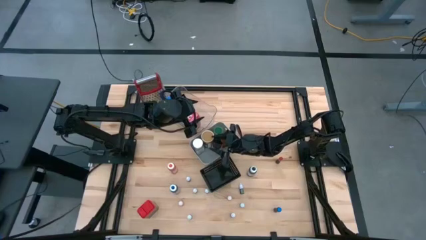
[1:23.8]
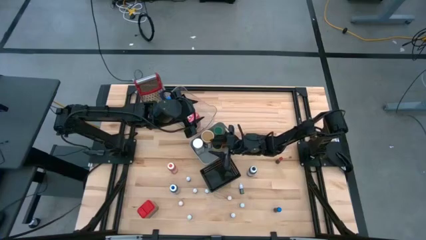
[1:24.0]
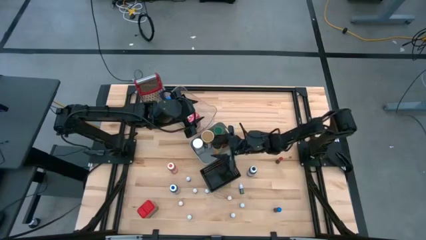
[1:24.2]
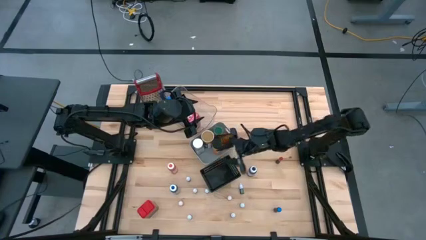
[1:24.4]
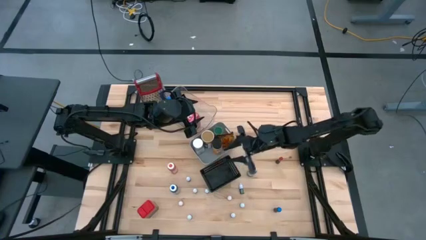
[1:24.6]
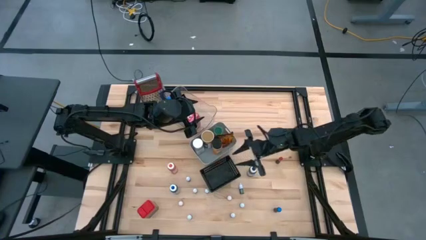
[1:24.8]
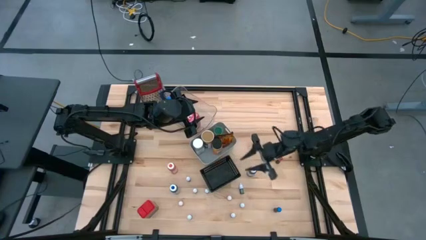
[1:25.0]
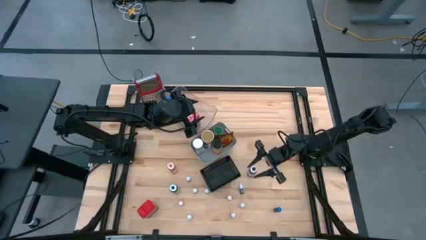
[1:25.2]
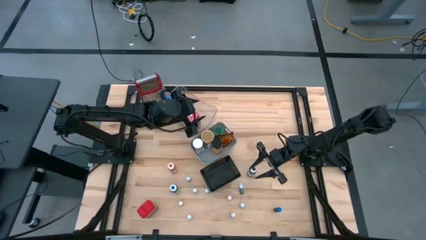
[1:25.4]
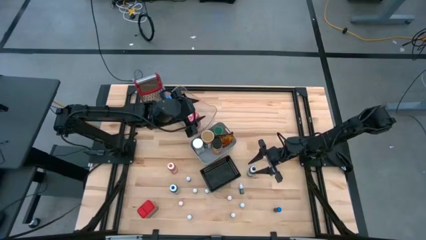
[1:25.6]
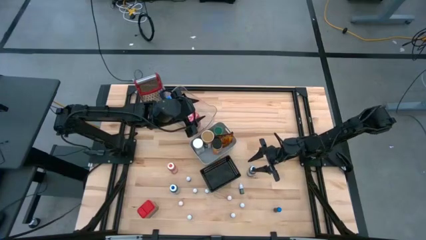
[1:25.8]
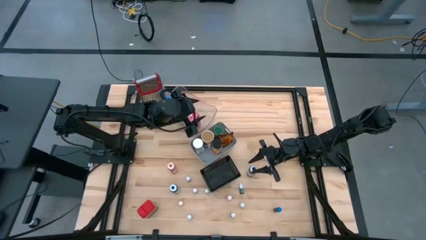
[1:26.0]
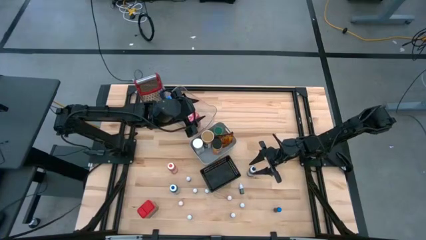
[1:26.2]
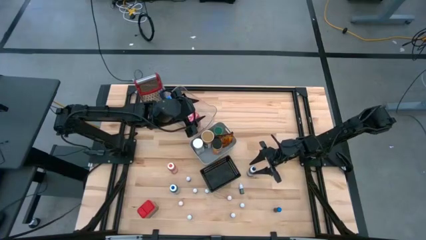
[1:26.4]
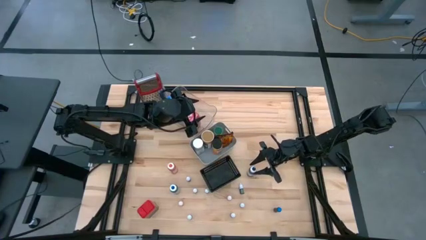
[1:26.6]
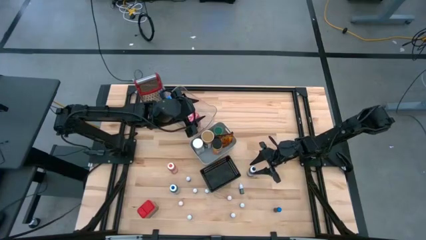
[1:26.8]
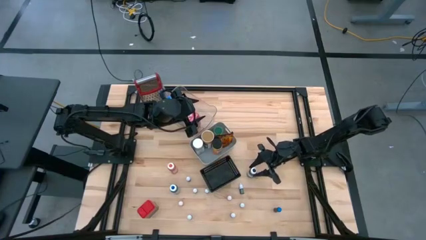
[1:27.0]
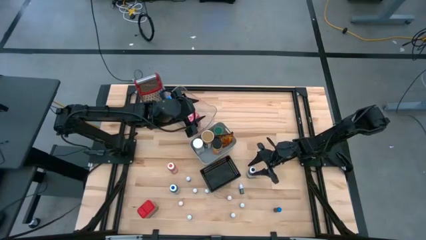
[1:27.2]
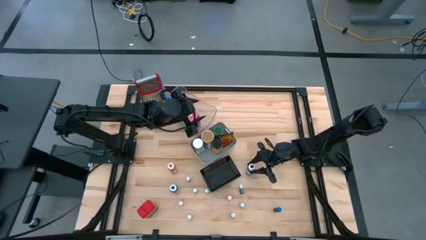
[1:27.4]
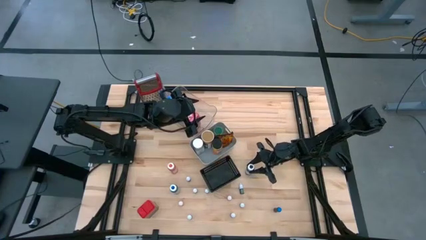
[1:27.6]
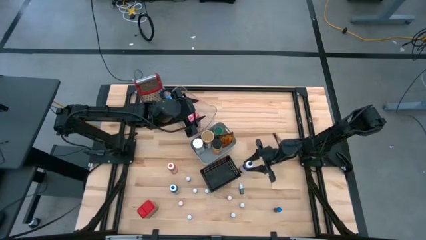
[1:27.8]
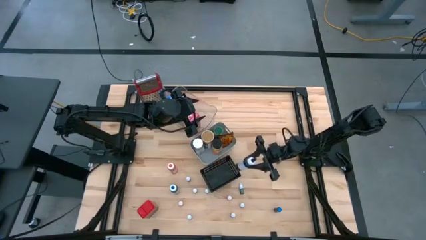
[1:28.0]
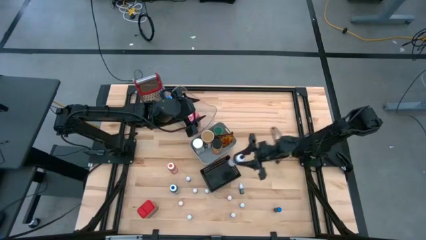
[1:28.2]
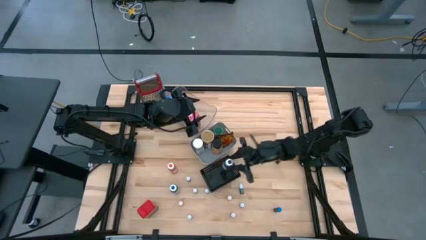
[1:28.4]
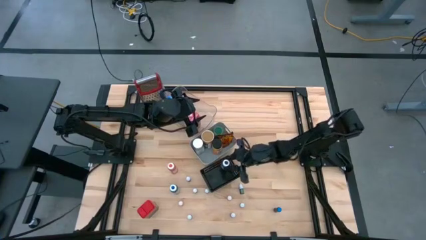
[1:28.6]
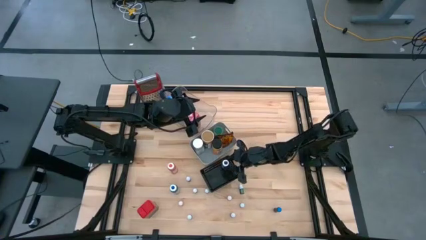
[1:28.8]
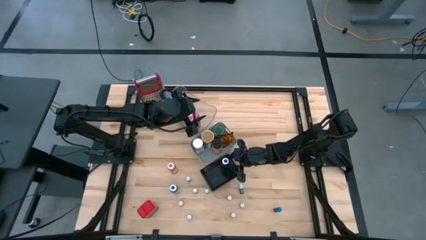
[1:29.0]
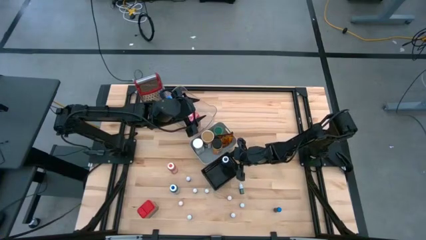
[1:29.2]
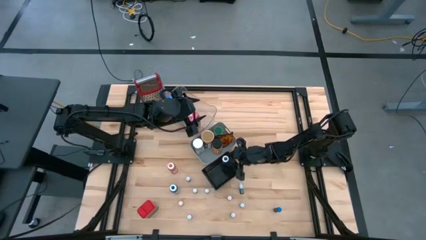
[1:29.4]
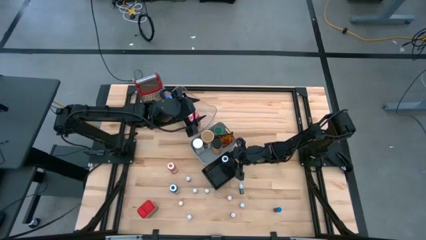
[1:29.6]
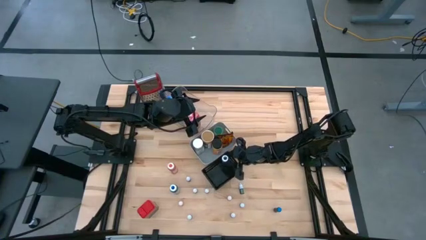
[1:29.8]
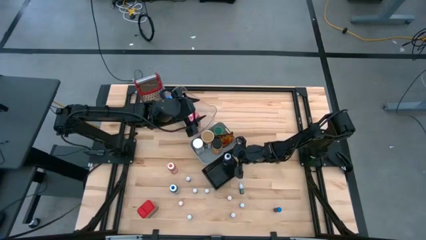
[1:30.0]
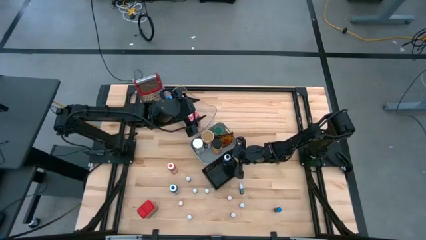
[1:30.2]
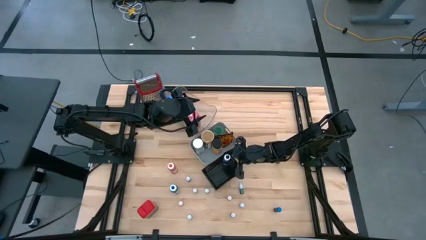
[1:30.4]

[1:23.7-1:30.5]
Task: Pick & Place Kitchen Items
Put the black food coloring bottle into the black bin

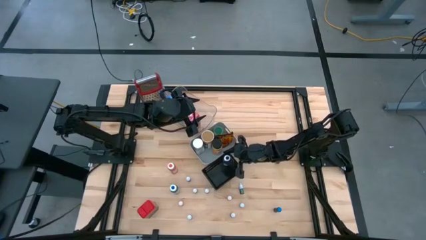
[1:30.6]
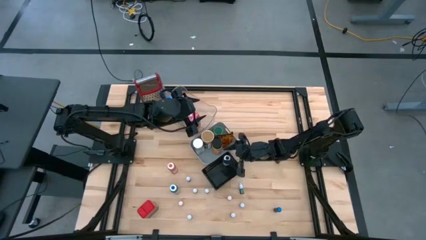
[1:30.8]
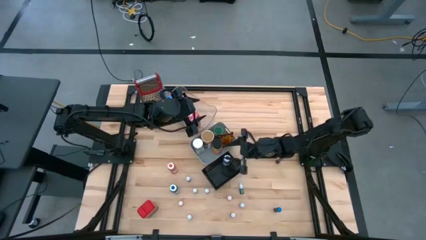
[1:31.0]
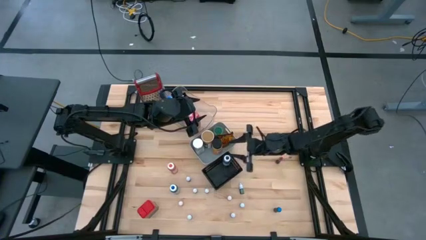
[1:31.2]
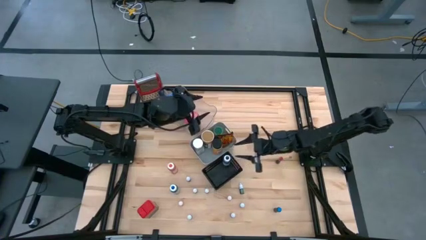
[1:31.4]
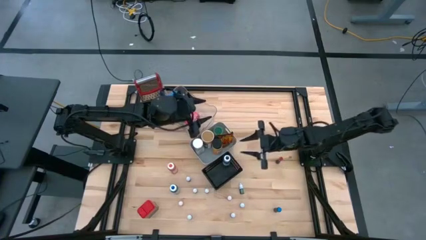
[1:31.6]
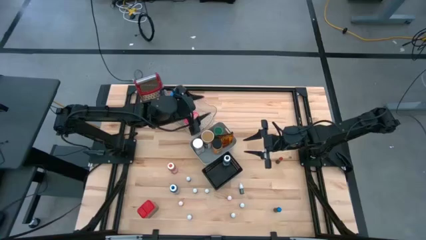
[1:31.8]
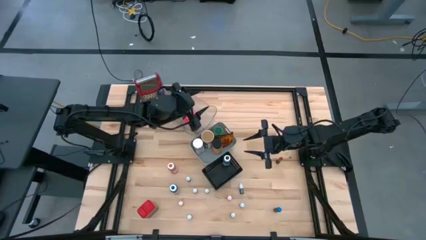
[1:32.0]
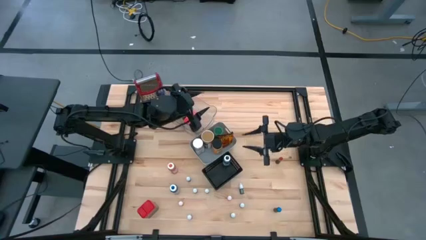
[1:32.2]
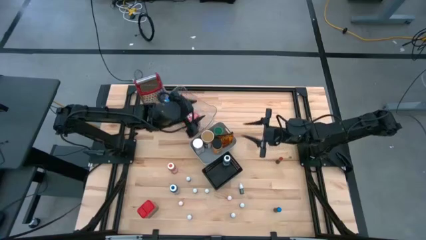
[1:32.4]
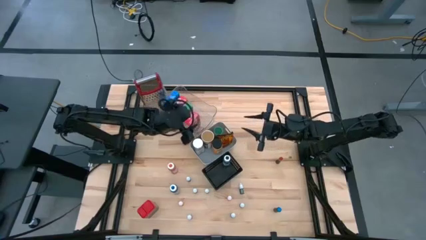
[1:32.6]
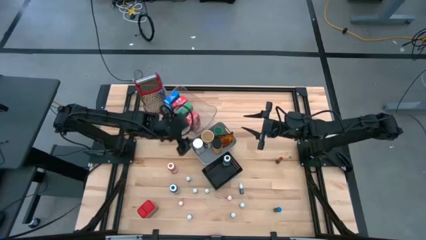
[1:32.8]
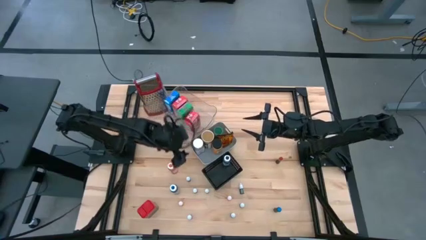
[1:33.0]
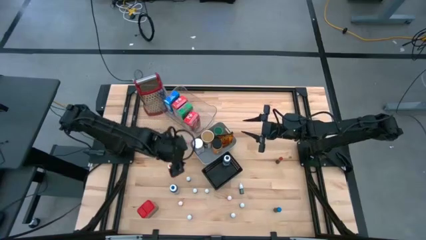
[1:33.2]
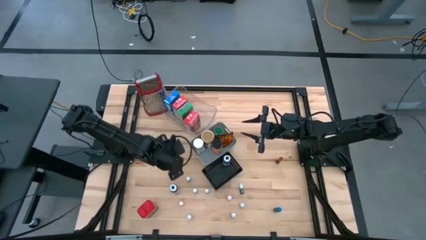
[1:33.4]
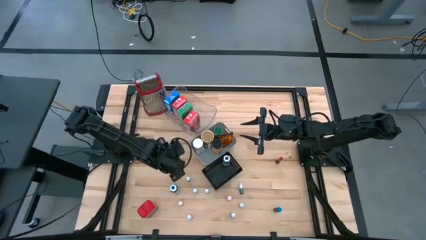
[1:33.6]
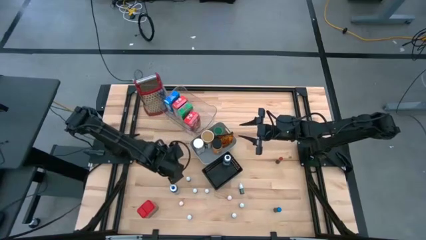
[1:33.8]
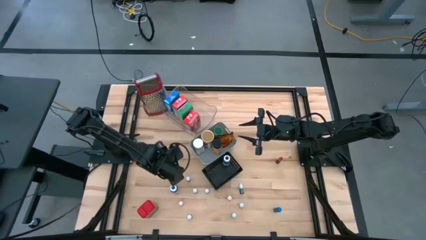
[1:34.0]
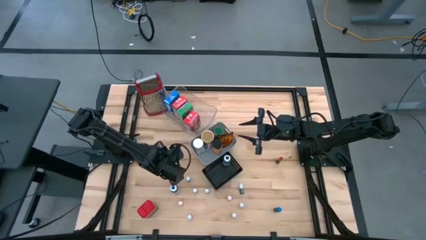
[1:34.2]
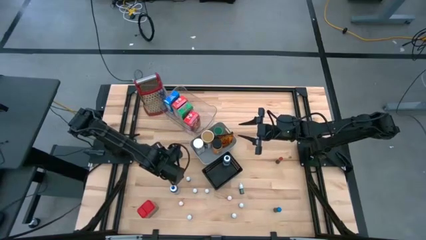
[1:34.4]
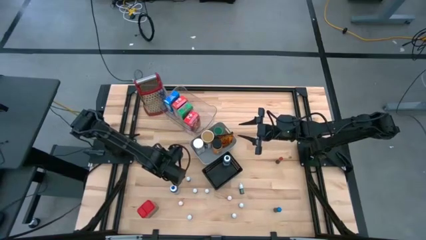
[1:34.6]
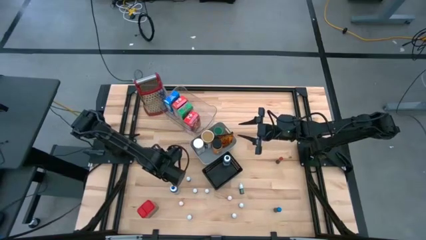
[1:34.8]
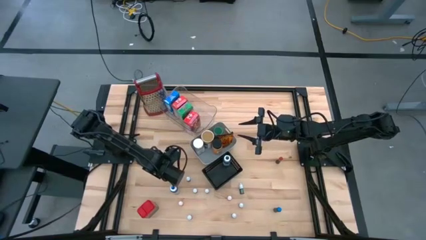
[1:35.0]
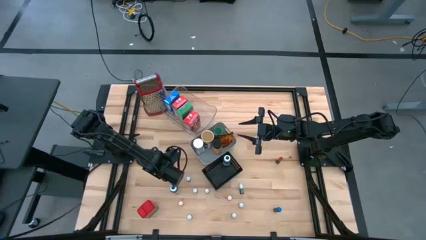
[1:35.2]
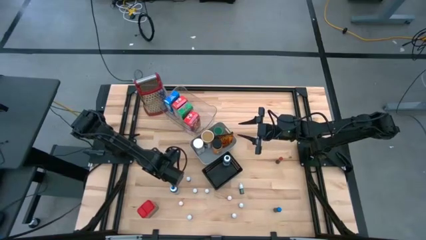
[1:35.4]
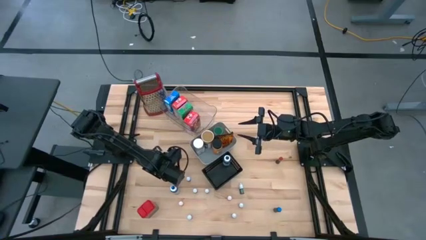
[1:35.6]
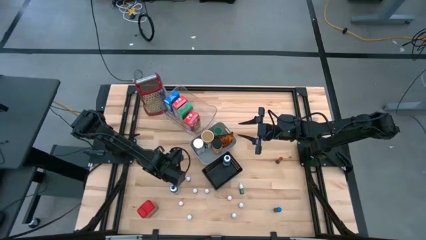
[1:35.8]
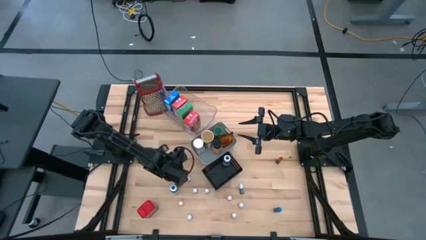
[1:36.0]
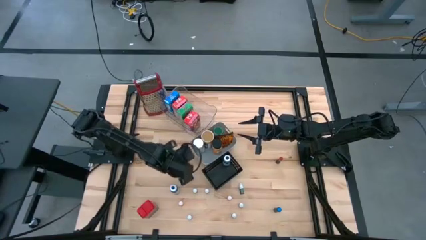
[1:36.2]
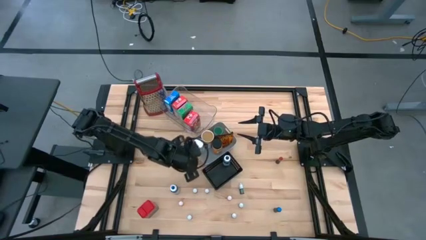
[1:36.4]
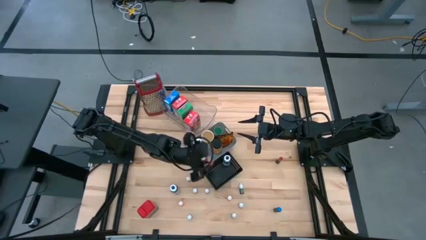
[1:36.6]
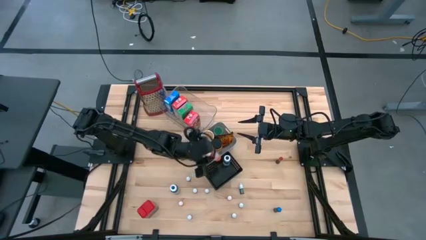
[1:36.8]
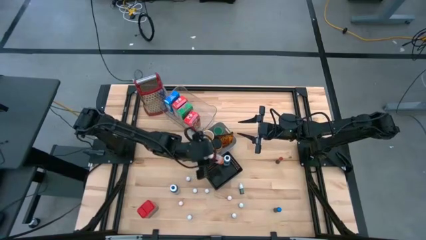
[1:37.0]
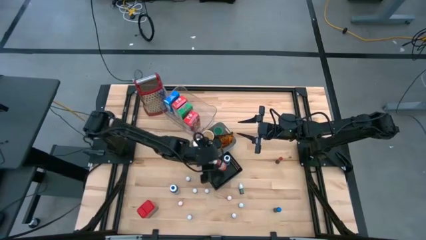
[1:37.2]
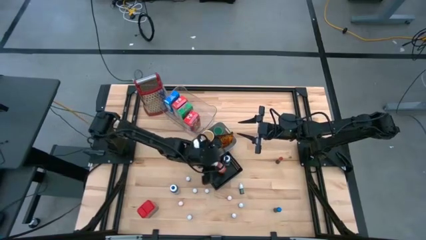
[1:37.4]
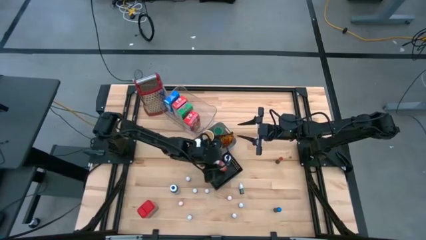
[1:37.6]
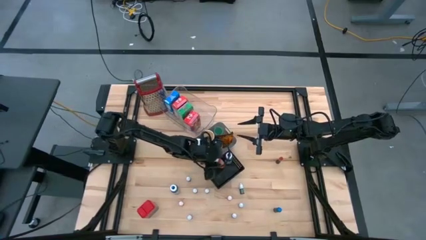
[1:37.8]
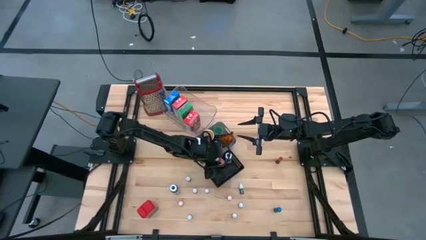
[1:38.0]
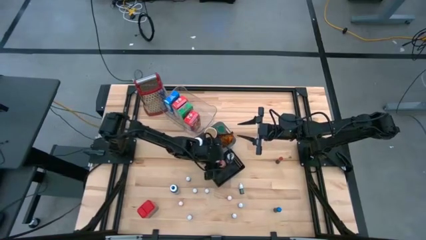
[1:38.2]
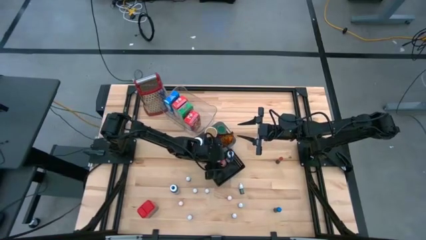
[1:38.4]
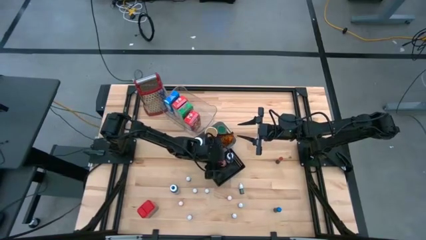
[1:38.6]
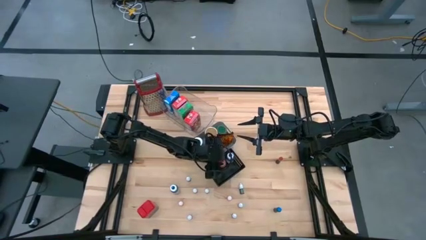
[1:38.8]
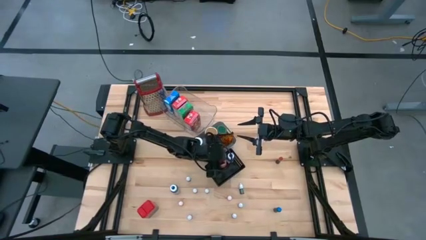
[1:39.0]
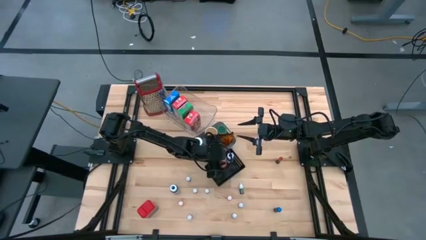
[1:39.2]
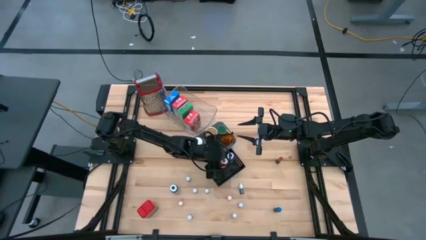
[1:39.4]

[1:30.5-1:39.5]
Put the orange food coloring bottle into the black bin

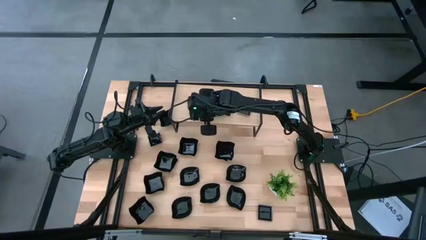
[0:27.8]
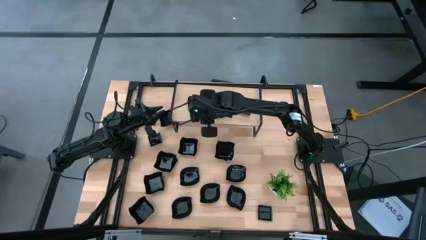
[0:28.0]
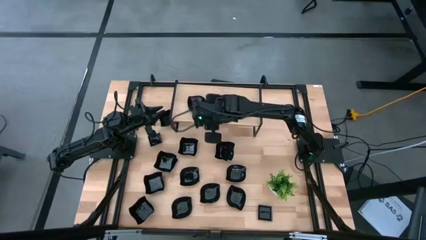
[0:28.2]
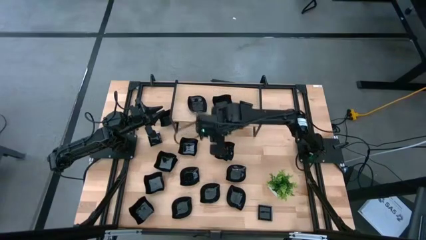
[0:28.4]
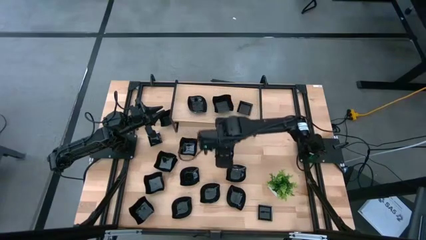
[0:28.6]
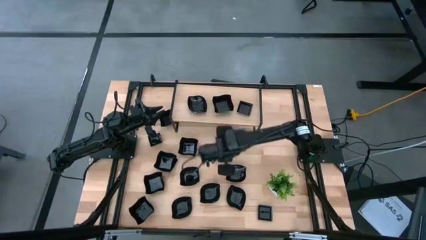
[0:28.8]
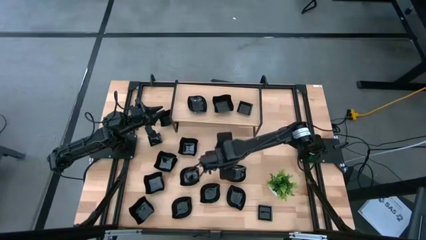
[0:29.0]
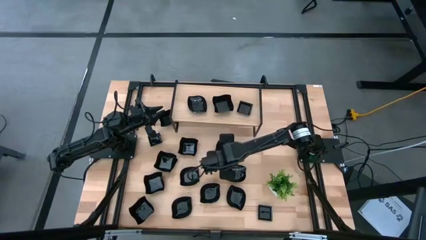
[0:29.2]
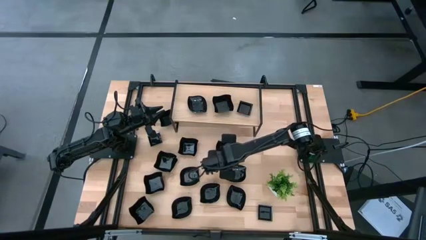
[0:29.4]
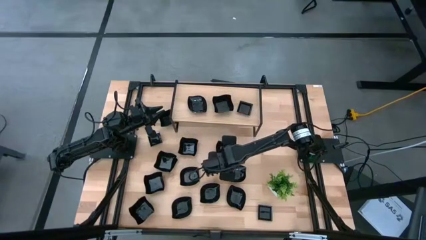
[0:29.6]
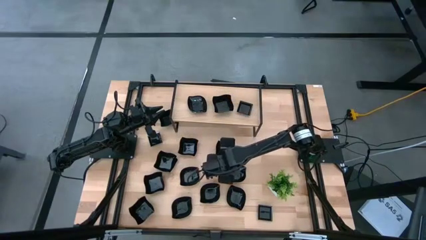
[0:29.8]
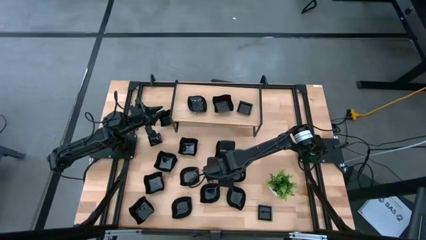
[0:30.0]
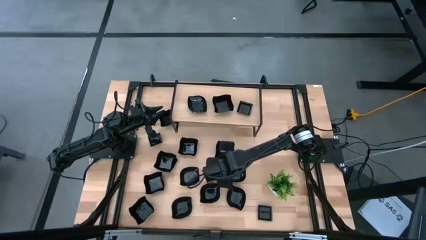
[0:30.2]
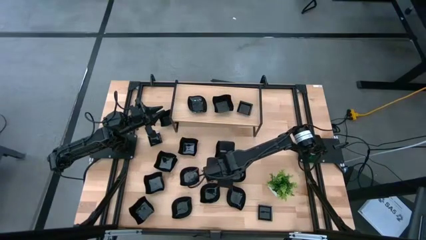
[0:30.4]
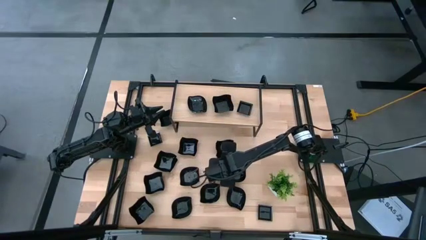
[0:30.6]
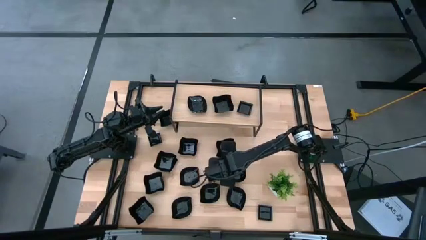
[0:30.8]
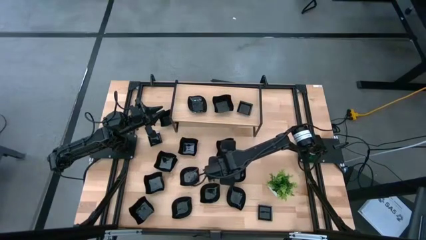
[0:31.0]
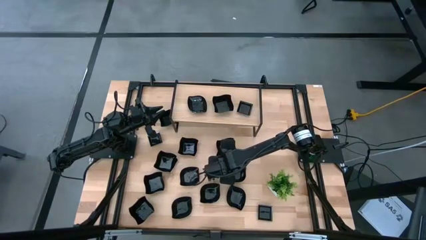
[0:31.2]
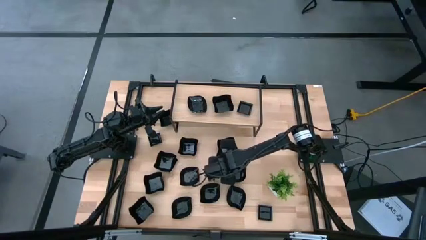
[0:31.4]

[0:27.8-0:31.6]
Task: Pick & Place Mini shaped plates
Stack the distorted square plate on top of the distorted square plate on the shelf
